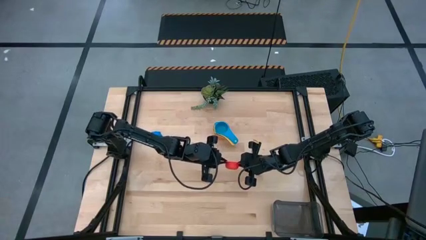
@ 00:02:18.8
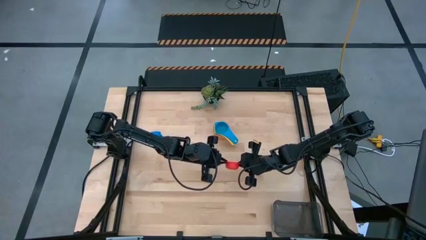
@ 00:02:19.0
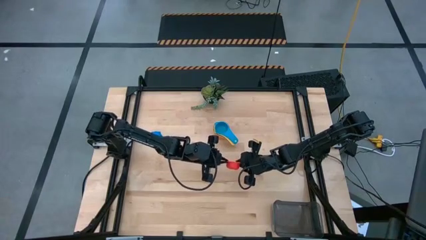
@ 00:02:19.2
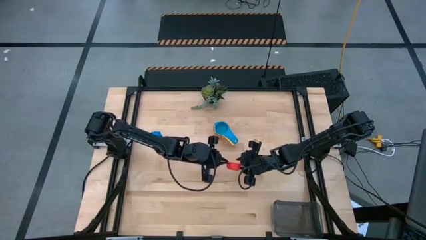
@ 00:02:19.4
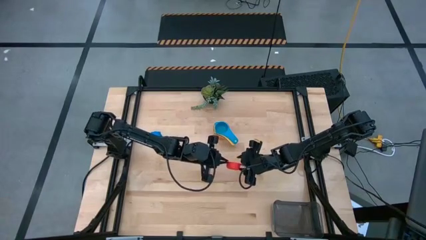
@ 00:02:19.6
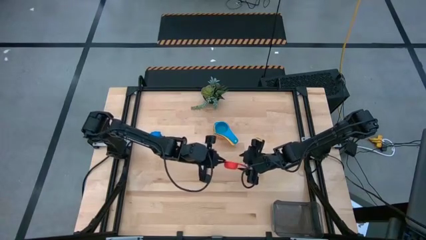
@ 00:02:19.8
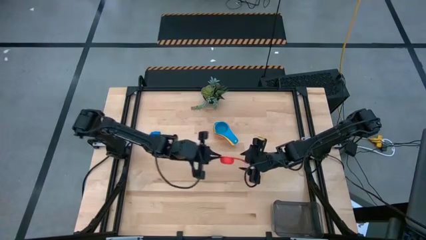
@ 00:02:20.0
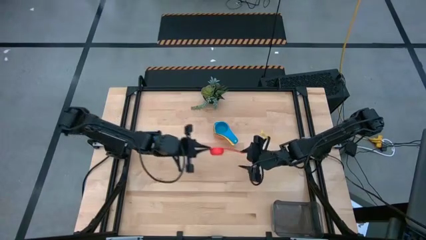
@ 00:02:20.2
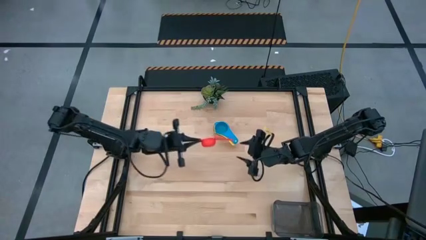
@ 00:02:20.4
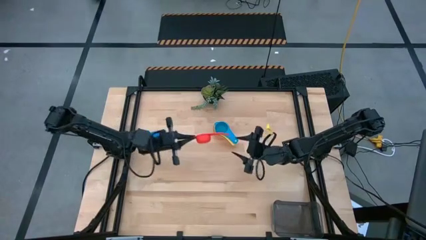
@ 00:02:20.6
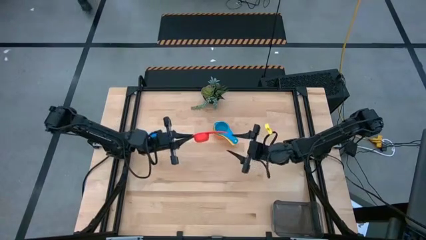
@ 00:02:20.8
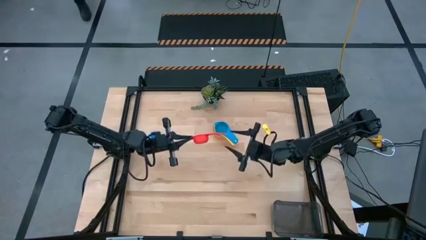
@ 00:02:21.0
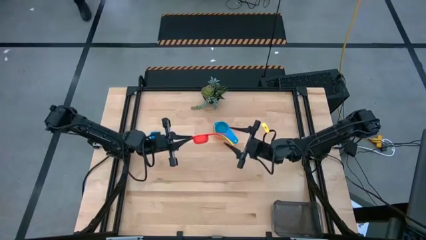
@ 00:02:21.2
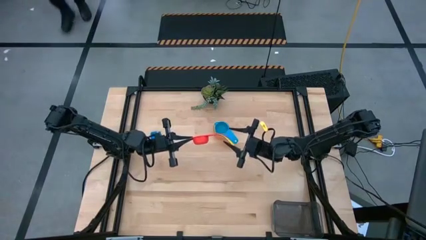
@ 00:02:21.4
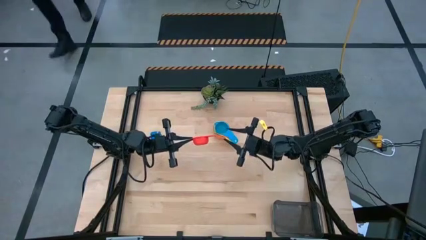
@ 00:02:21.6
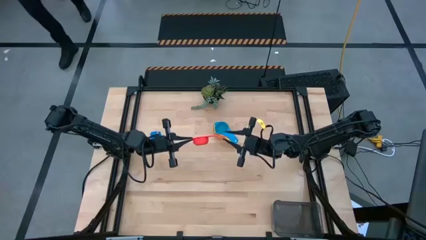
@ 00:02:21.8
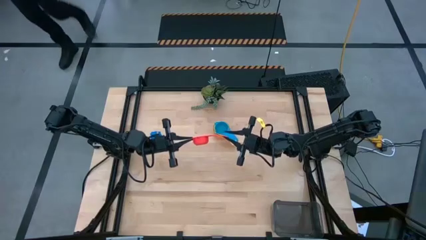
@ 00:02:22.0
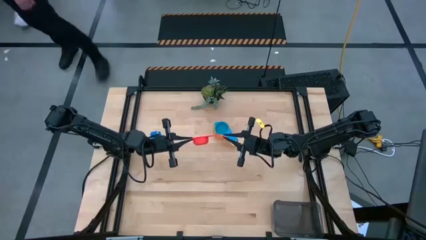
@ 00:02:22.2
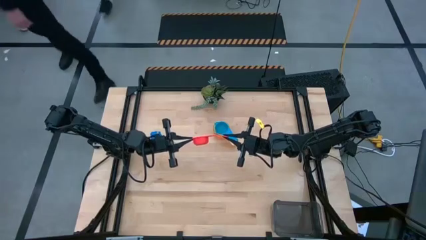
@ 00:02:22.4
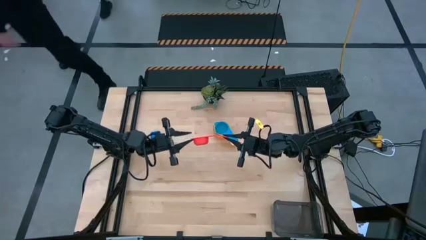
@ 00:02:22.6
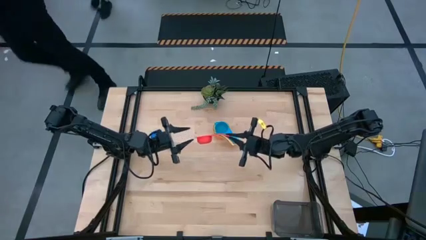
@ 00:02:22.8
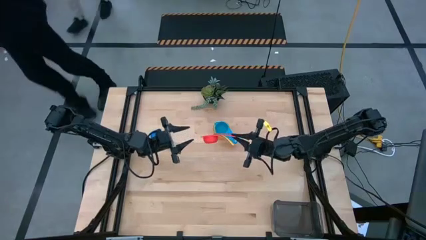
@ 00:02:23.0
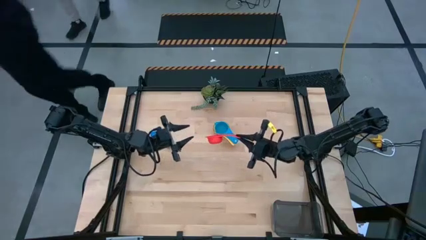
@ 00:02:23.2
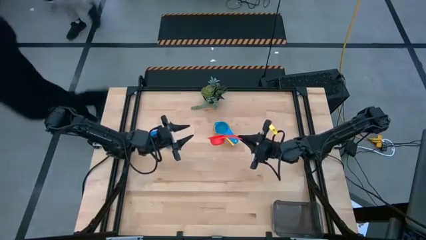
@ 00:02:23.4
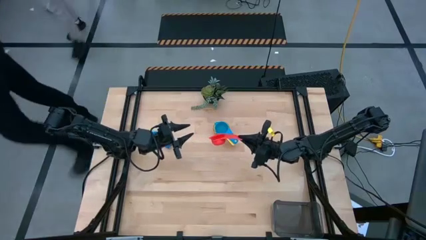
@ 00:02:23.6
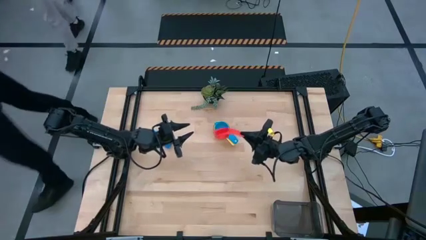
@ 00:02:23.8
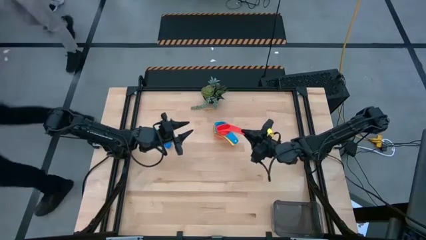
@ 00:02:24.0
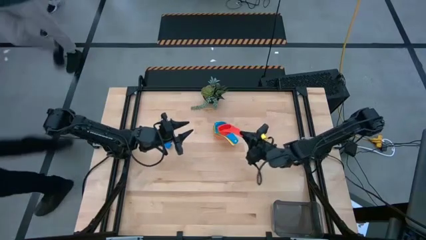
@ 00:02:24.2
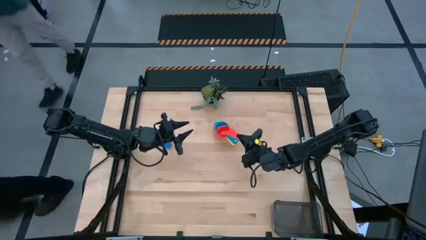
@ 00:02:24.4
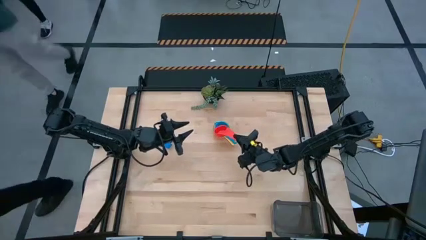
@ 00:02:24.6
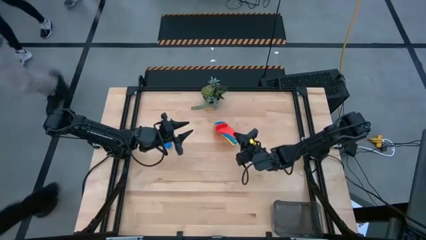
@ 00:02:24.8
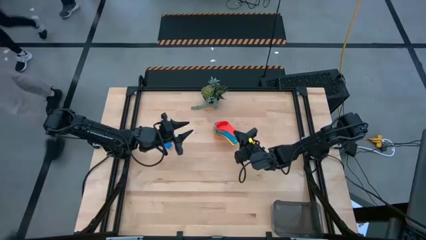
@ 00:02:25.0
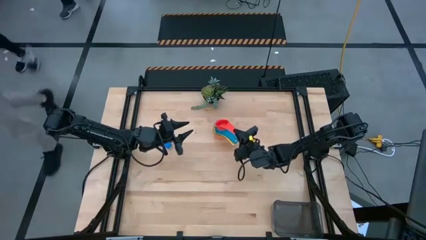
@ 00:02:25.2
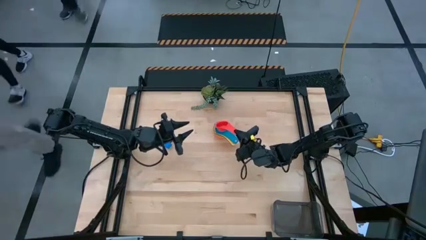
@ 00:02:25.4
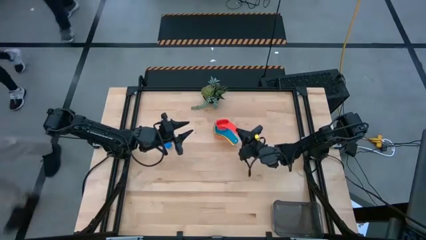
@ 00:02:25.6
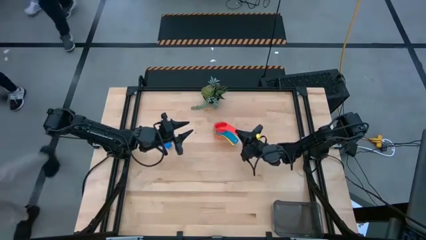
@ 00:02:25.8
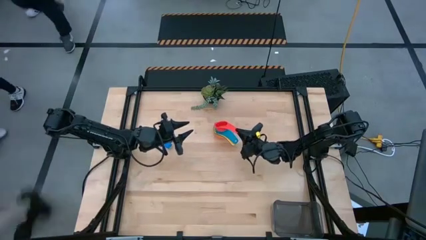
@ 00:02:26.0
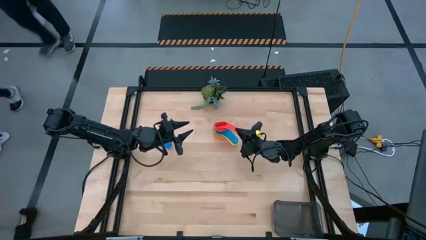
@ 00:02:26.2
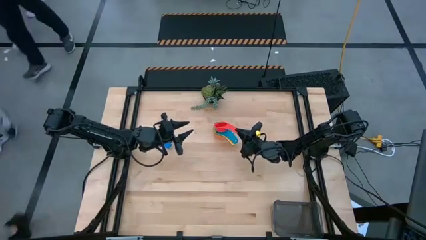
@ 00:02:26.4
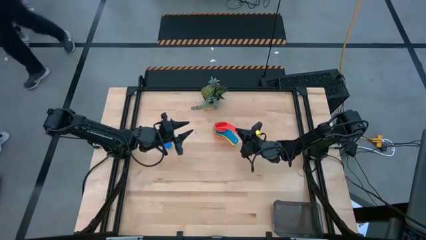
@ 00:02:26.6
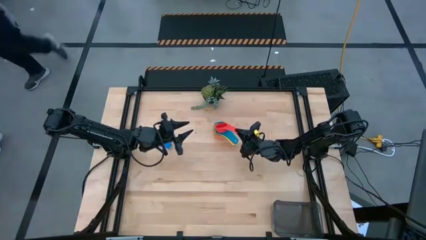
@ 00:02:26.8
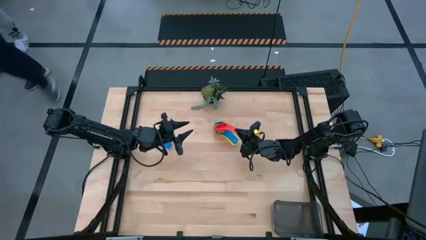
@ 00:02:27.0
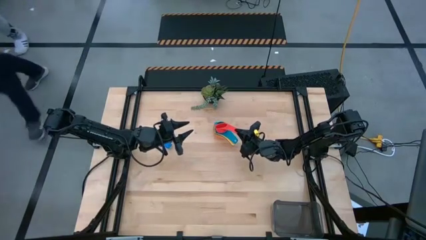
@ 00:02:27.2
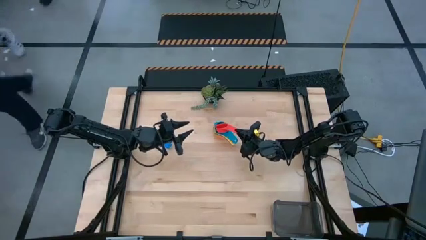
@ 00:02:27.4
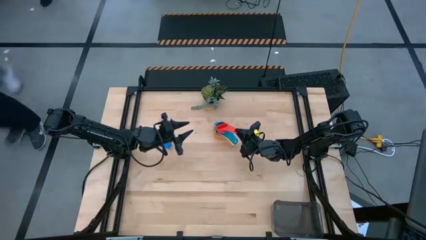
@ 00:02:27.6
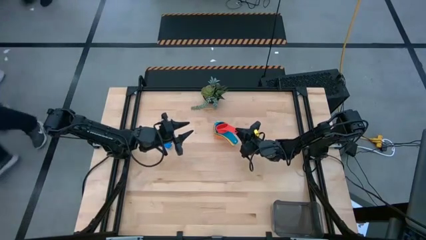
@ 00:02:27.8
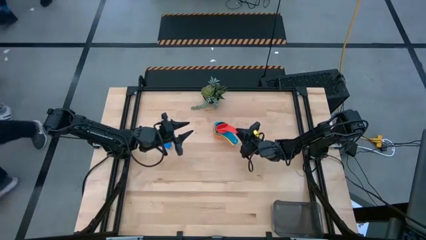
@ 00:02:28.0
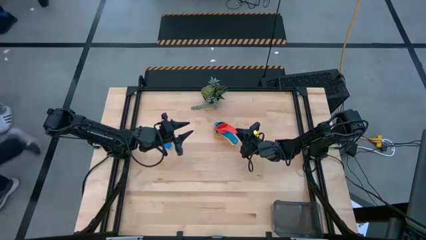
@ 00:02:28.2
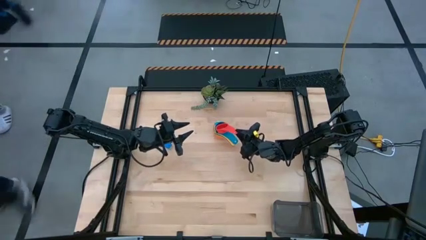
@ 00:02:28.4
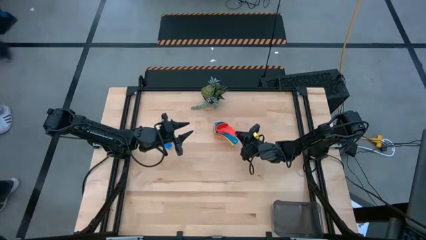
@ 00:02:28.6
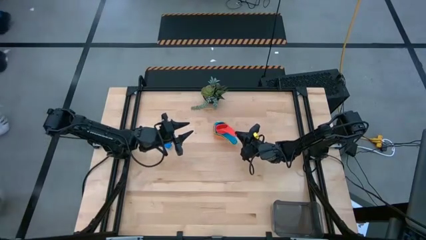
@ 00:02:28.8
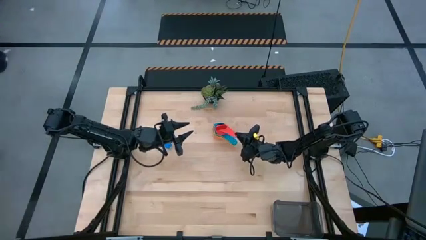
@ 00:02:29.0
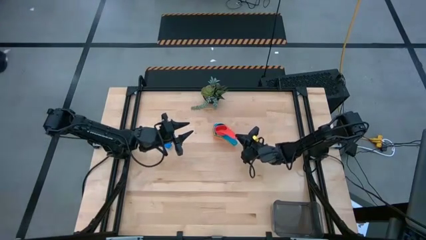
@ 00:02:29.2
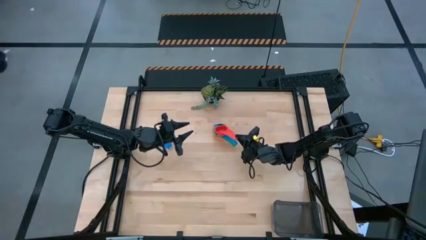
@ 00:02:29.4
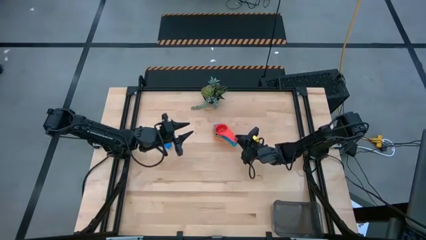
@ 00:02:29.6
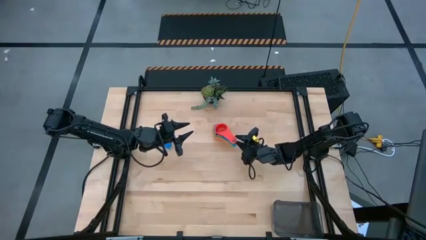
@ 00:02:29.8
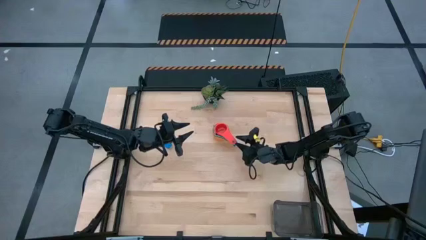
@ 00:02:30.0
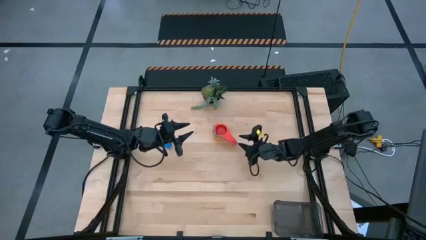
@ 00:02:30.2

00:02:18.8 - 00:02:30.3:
Task: Nest measuring cups in basket
Stack the red measuring cup on top of the light blue measuring cup

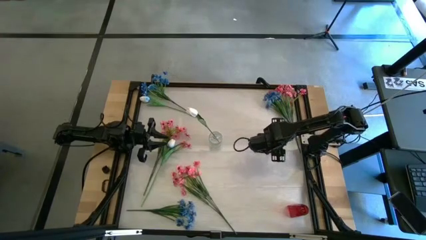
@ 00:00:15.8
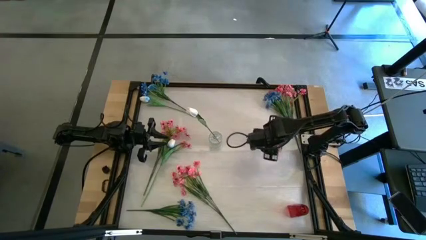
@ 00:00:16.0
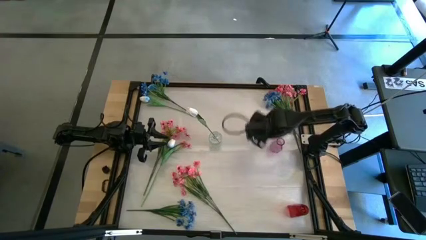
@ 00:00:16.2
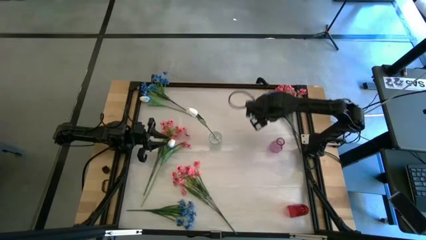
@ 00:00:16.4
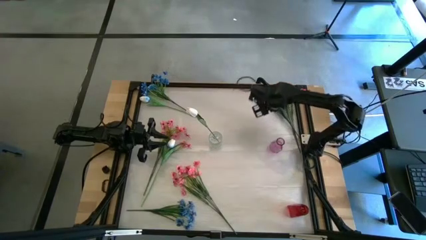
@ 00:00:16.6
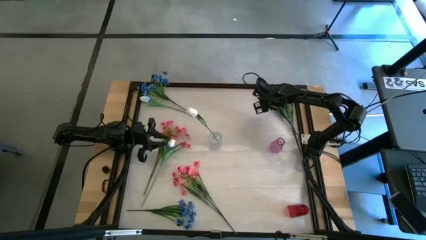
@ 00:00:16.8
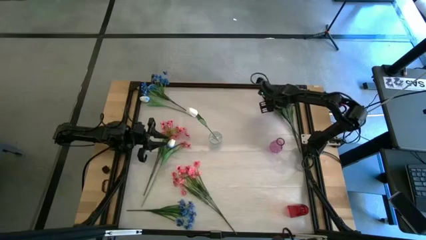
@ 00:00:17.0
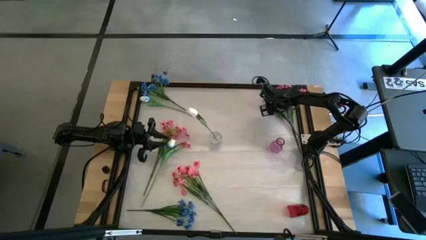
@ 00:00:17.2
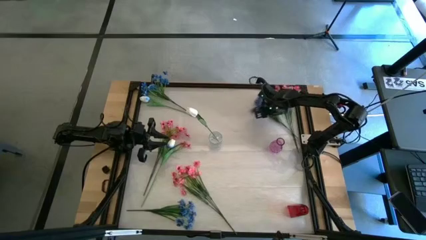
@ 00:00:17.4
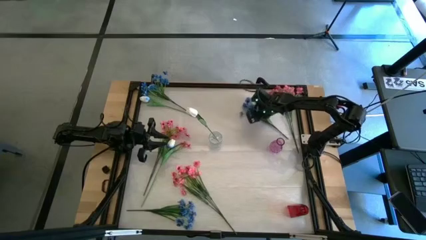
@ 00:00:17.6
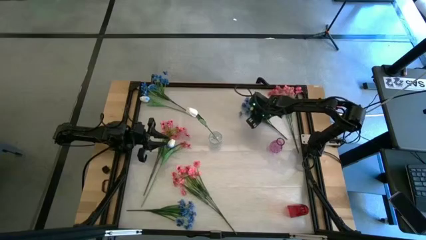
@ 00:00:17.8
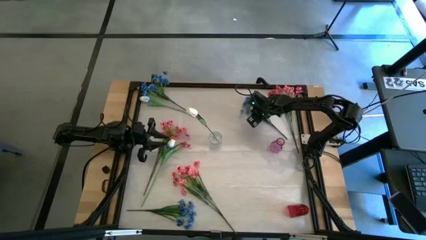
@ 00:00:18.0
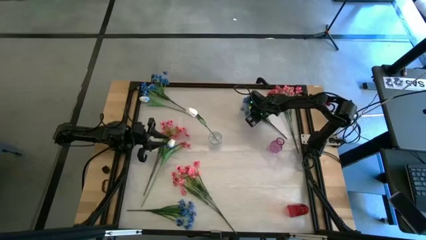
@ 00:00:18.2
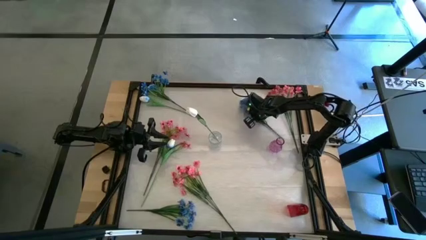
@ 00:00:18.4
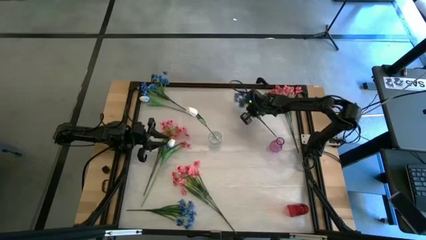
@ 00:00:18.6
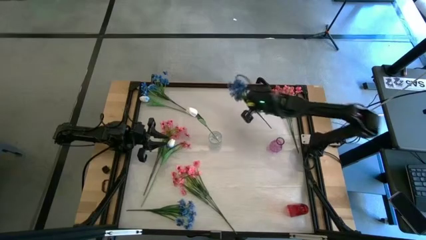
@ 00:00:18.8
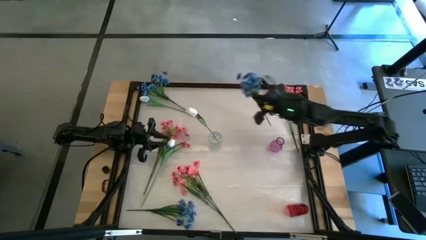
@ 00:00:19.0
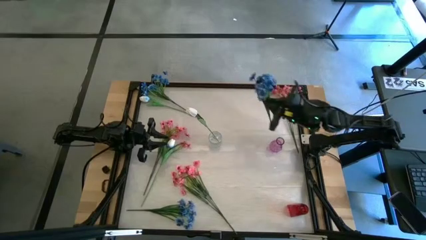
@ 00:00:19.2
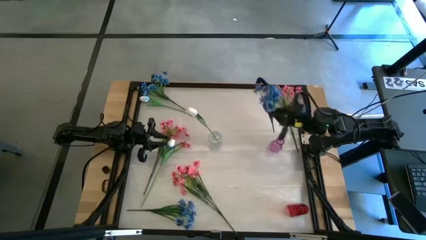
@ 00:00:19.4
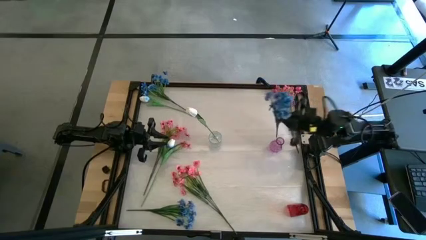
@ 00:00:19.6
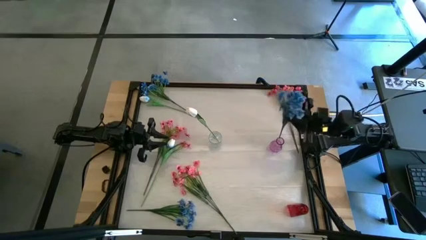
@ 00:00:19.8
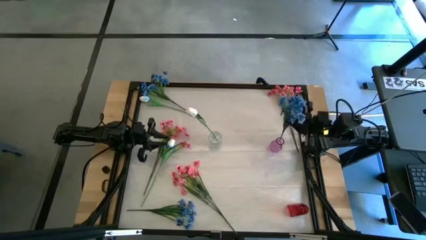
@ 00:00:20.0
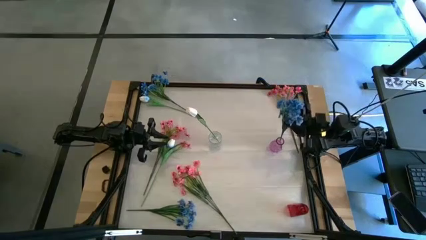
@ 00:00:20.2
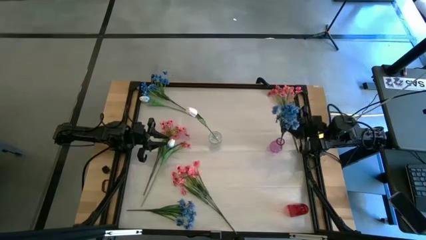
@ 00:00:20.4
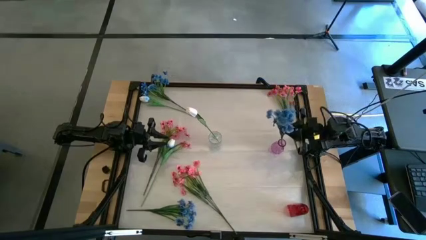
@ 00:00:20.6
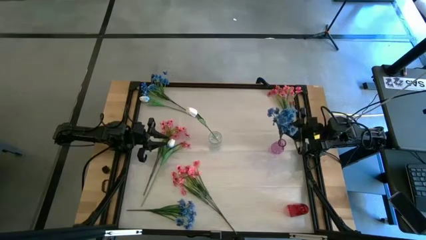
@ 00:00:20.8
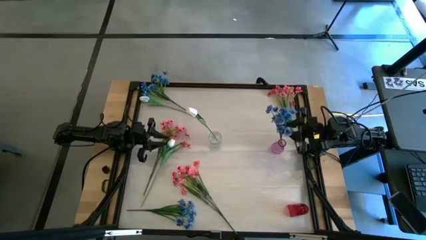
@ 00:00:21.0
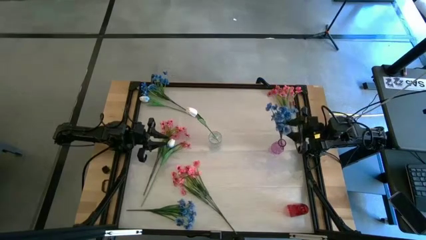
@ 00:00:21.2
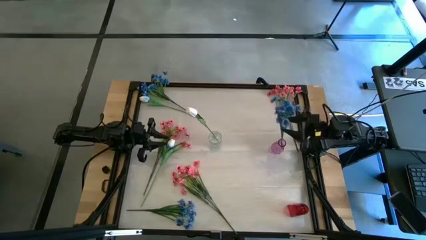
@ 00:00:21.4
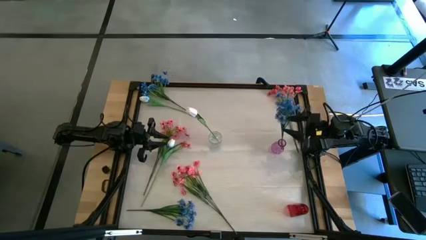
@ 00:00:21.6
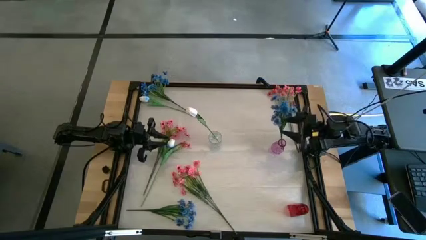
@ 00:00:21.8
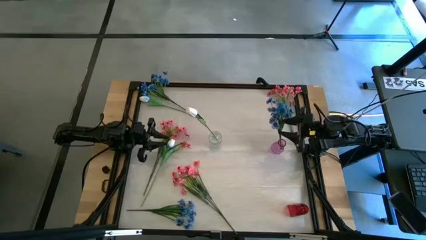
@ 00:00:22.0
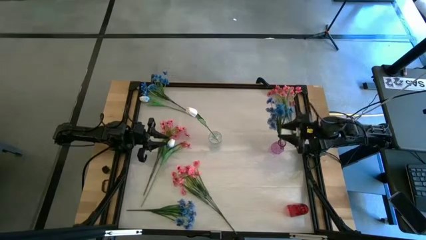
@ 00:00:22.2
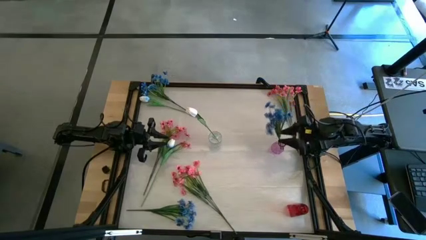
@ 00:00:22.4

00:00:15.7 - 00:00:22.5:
Task: Sort flowers into vase by color
Put the top right blue flower into the purple vase
